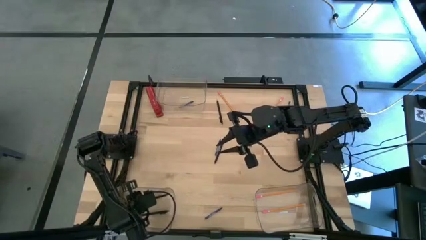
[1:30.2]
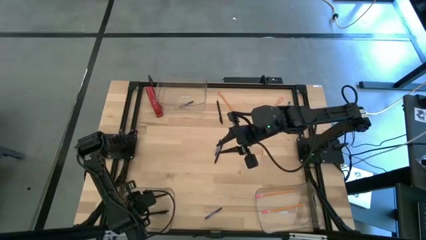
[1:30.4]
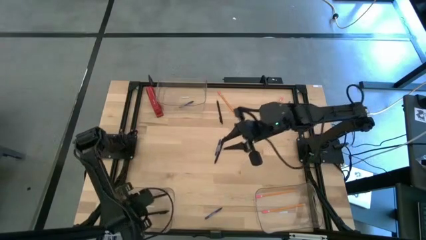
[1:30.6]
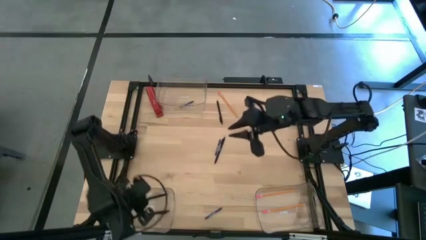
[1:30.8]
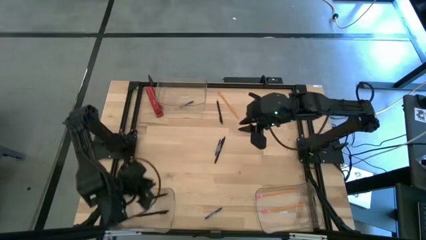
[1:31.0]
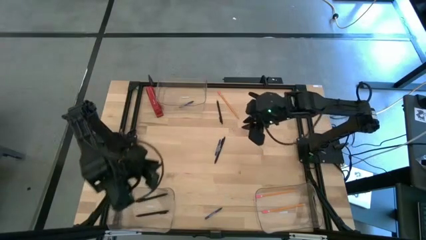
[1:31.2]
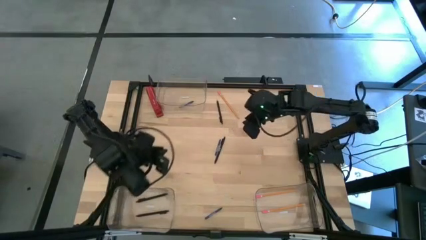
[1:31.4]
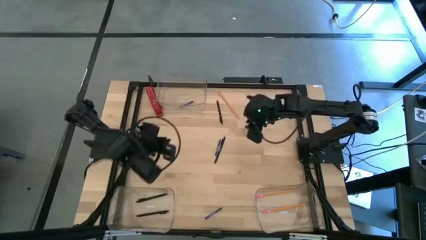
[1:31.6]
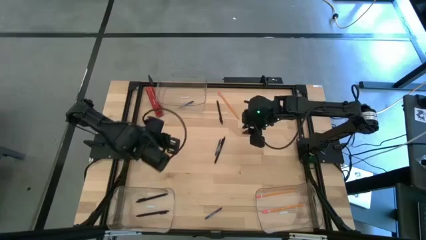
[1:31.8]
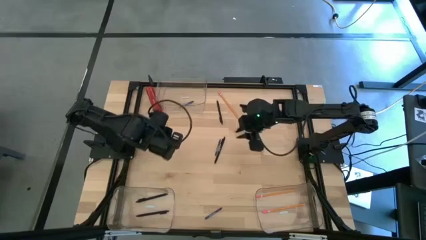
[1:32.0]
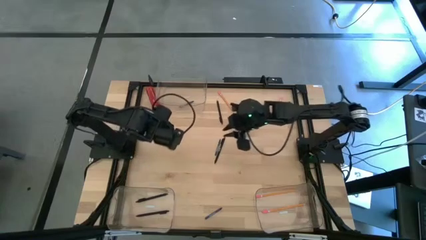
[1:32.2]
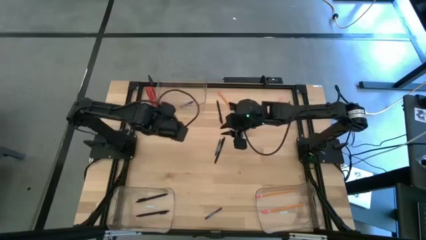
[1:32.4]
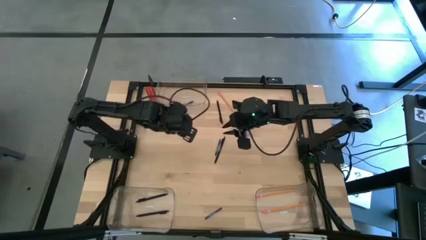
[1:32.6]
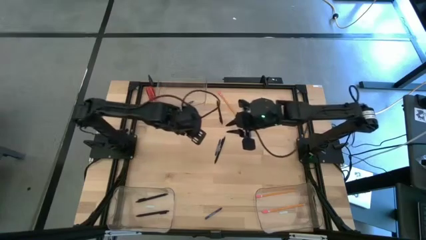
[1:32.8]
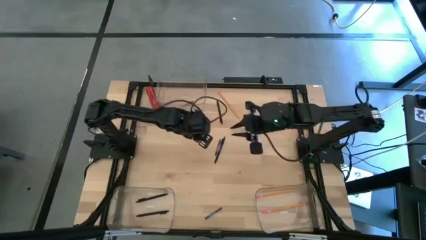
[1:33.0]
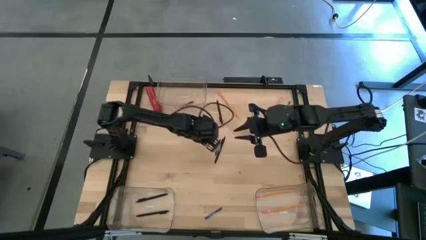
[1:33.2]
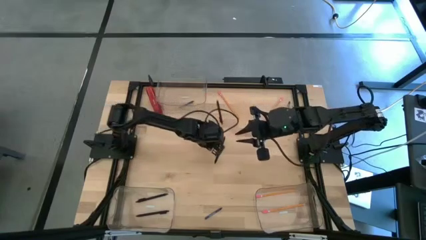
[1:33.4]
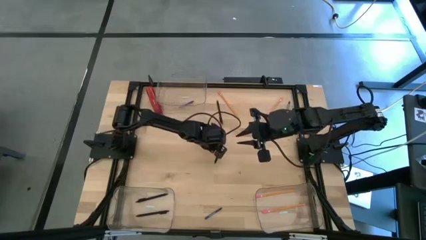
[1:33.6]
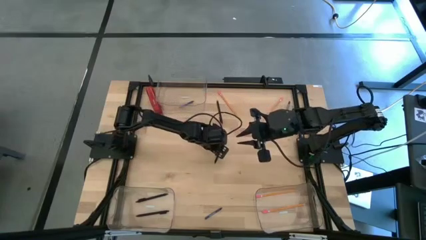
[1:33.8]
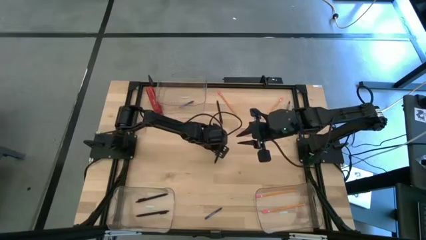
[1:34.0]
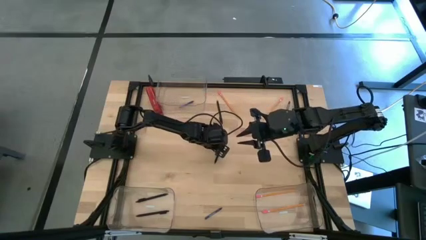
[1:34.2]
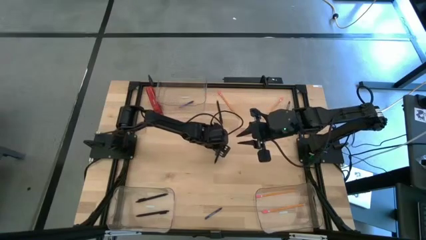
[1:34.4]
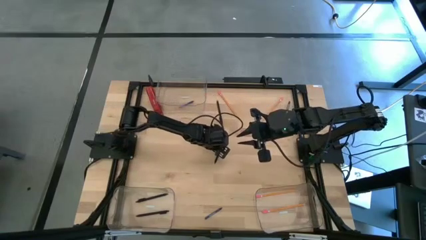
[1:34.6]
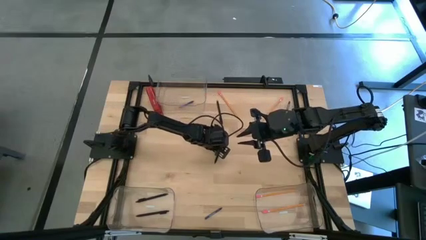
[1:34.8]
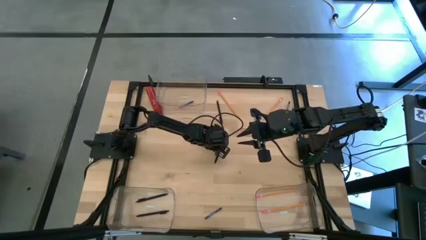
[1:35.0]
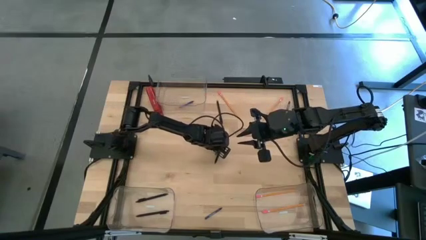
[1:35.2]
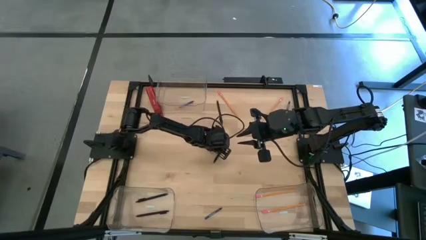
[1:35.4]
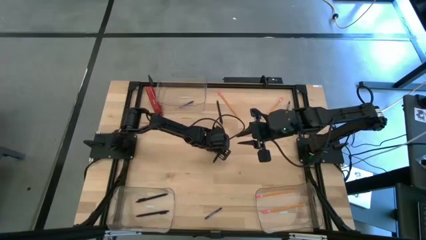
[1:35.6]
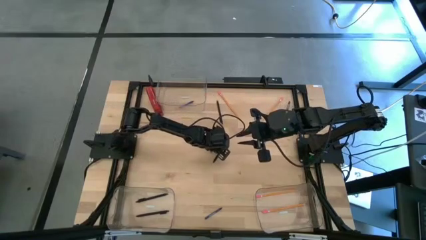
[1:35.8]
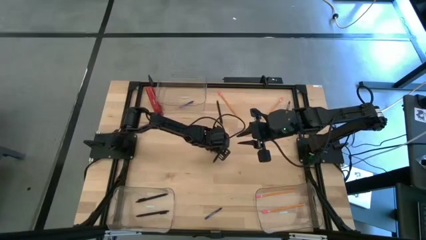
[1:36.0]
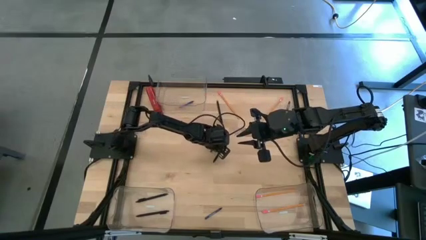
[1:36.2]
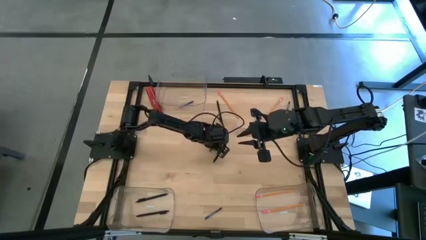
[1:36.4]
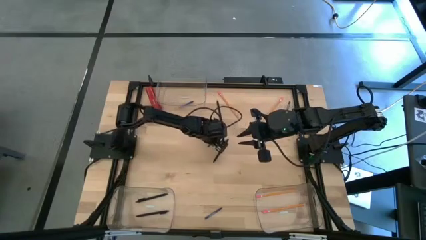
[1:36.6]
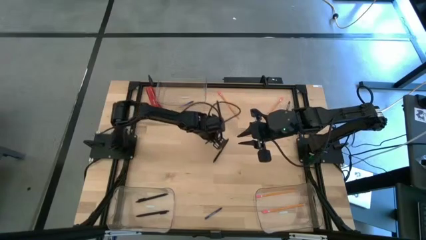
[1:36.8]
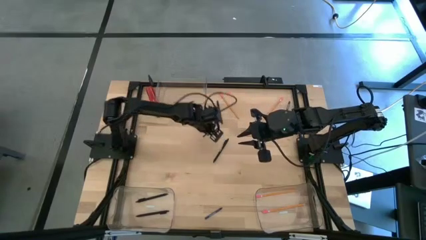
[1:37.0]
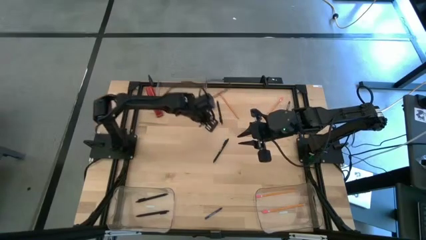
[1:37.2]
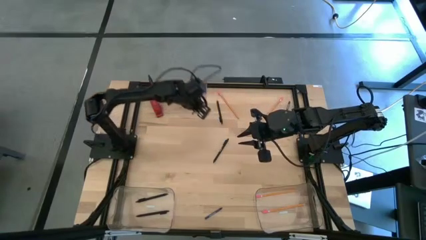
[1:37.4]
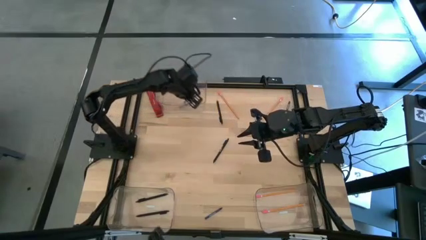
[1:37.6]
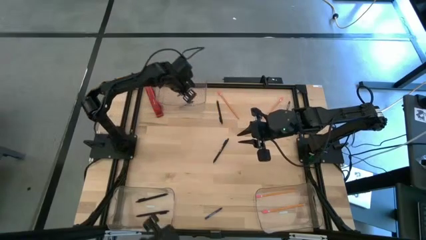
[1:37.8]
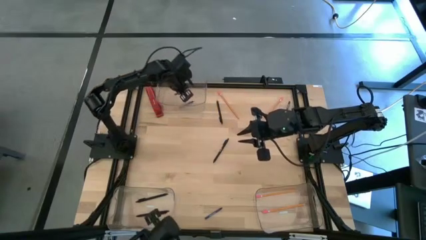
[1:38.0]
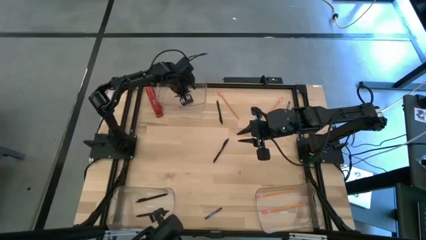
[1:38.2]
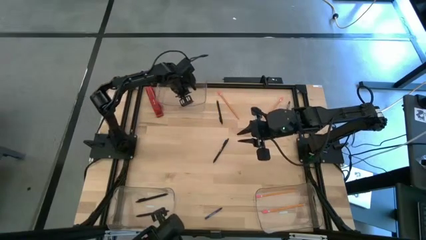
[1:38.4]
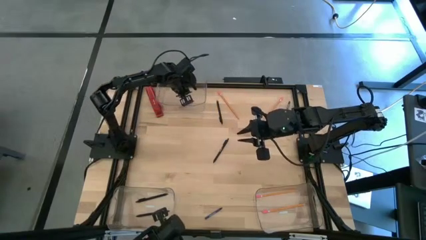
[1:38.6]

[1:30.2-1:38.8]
Task: Sort crayons/erasers/pens/pencils in bins
Put the blue crayon into the top transparent bin

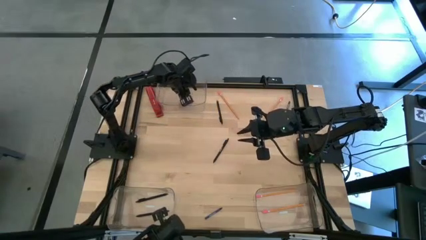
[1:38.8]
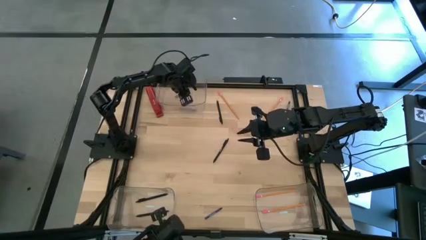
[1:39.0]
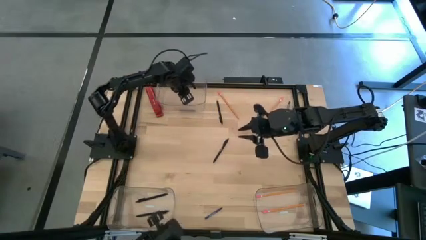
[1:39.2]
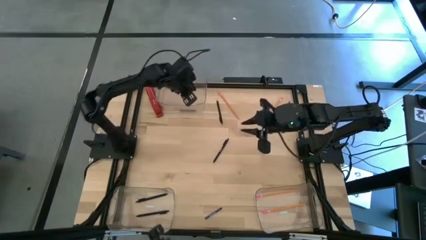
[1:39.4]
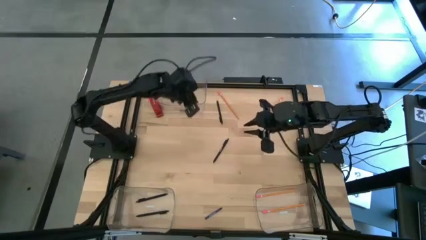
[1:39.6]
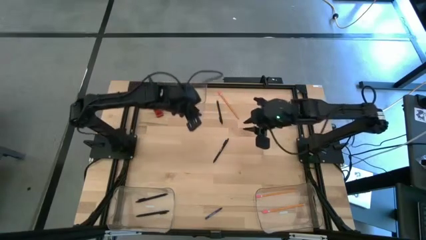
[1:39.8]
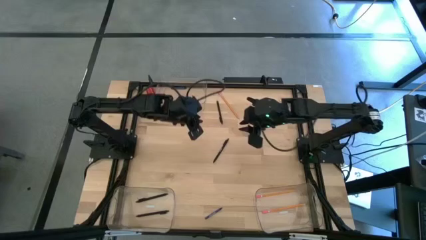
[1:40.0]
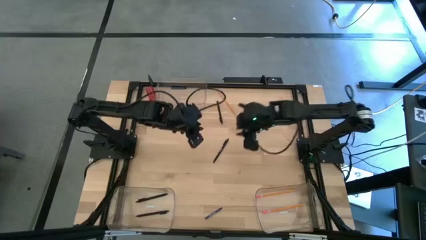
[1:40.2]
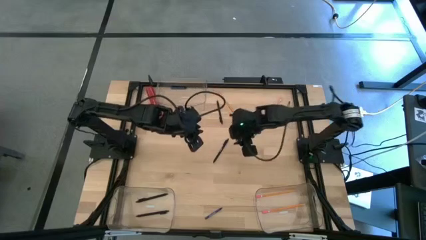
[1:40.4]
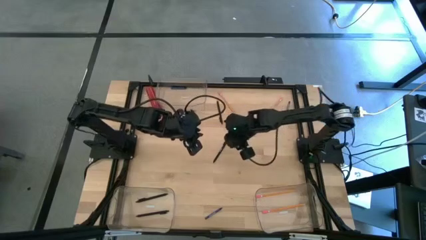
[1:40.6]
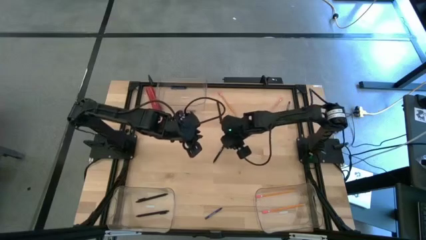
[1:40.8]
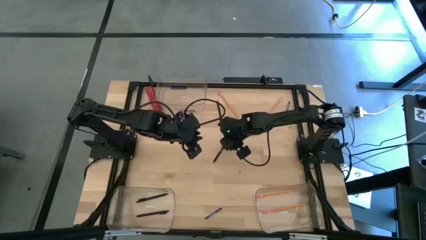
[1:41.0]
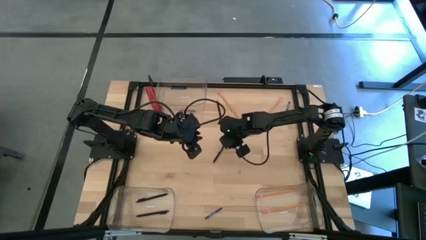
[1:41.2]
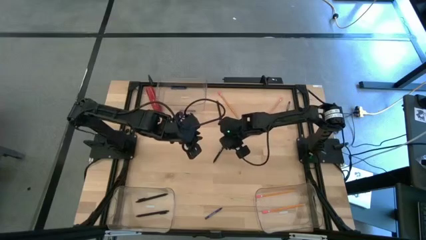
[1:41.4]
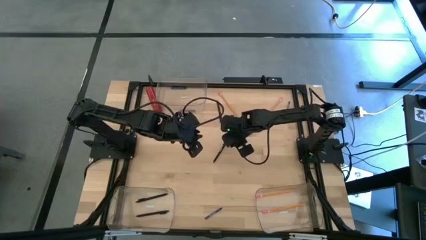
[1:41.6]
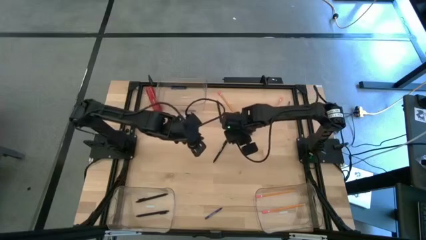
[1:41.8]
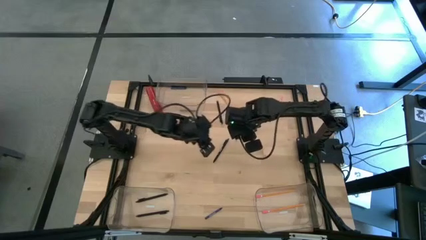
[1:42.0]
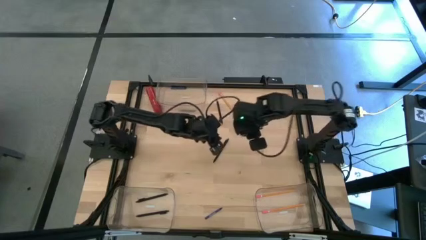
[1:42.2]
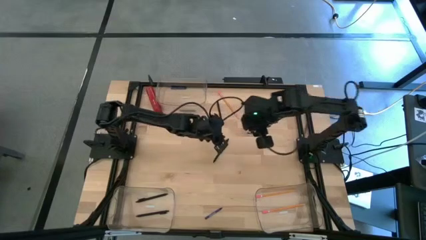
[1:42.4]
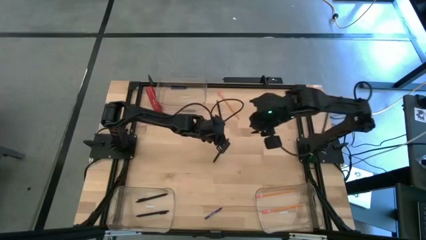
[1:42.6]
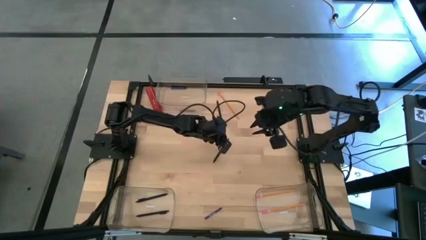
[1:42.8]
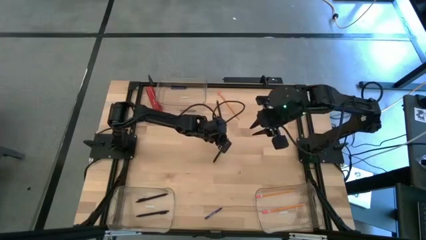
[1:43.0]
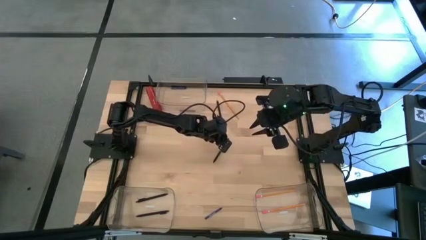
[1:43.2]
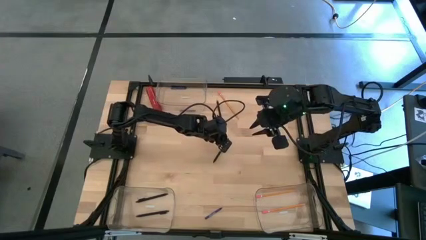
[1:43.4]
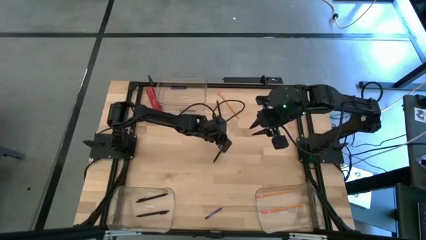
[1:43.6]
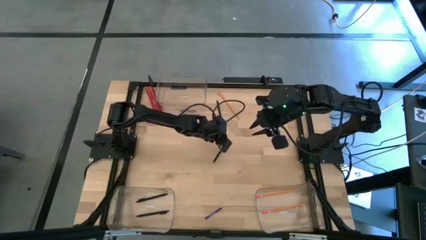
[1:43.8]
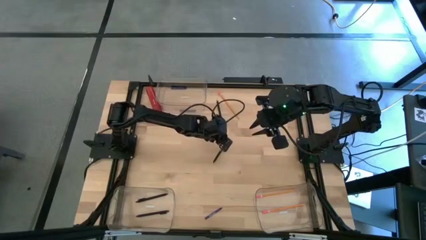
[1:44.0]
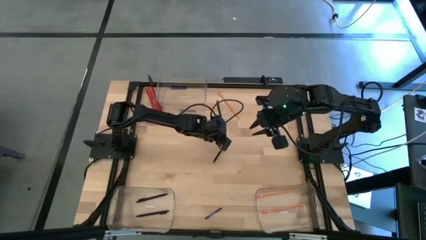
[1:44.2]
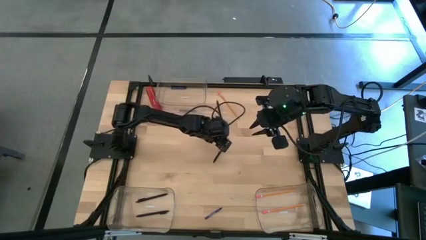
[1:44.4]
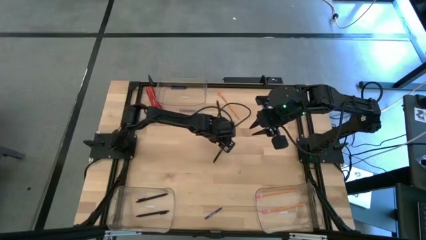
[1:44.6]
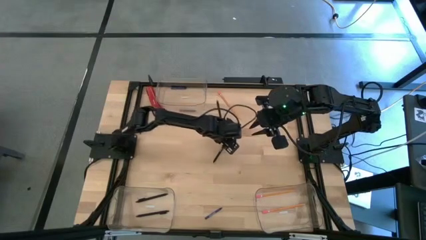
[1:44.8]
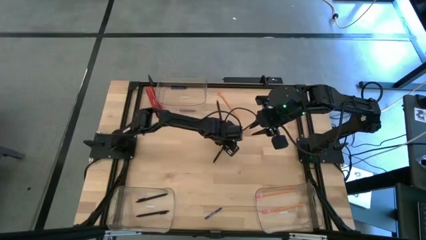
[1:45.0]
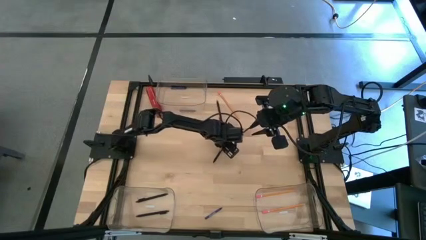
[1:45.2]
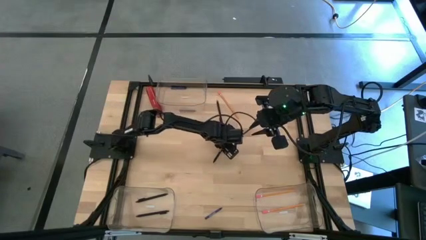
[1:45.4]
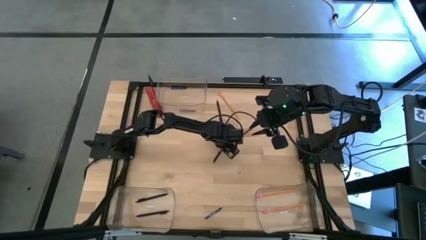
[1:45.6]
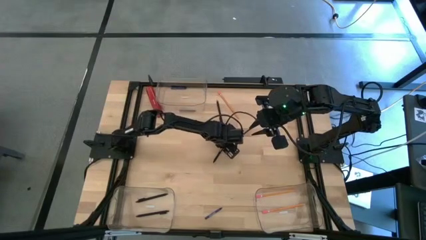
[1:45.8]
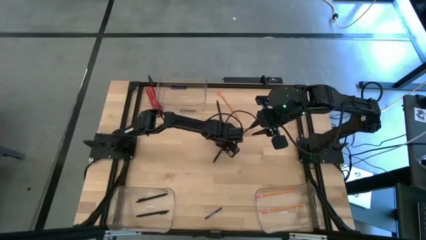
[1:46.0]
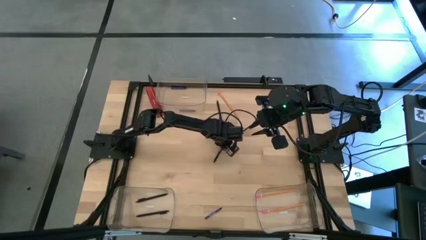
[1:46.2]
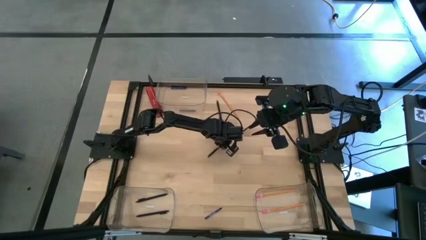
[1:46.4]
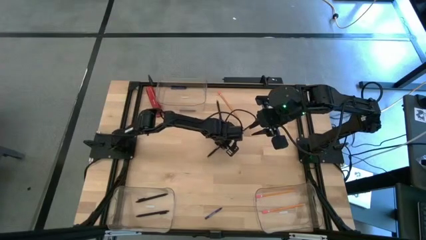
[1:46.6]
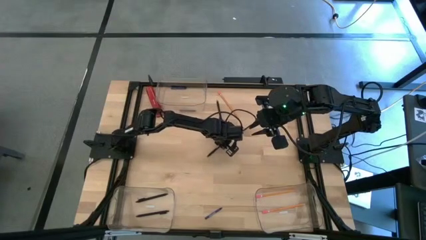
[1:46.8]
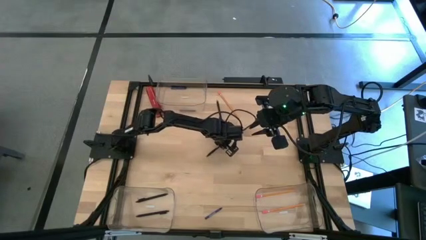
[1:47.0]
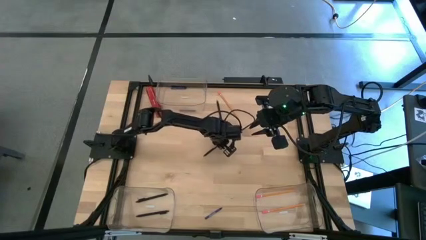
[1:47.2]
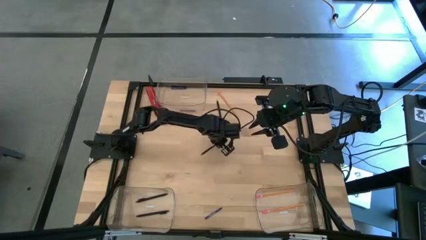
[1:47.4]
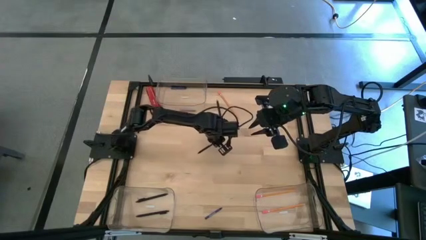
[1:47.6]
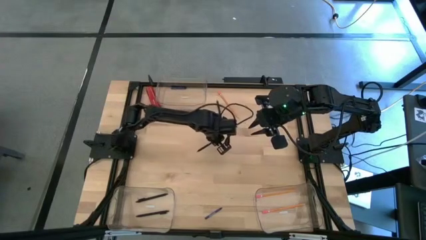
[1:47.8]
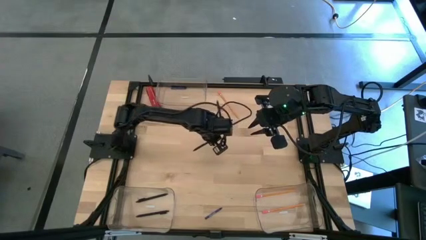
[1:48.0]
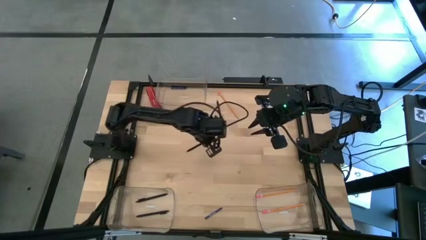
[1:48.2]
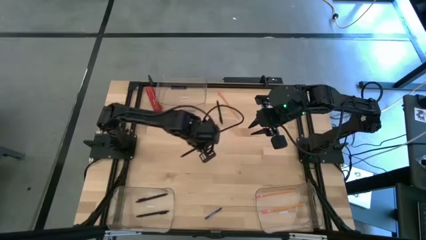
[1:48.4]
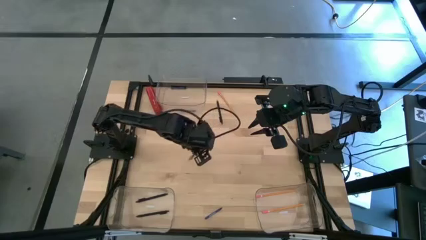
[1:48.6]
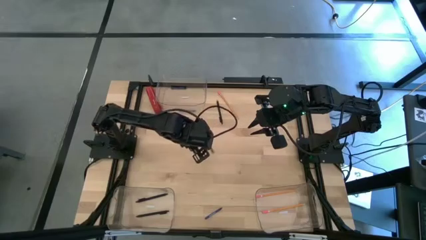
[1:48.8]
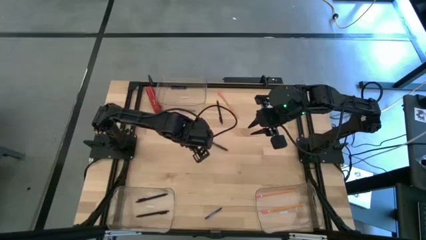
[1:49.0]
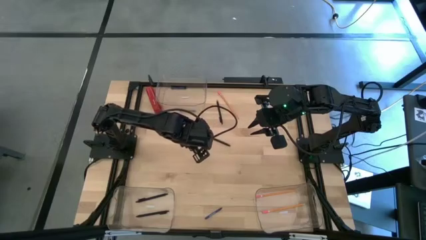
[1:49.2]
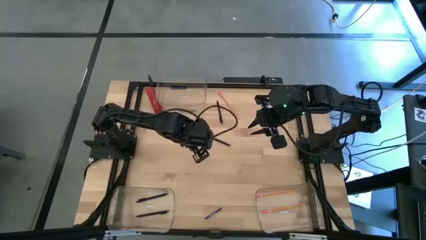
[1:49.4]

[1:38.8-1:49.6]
Put the black pen into the bottom left transparent bin
